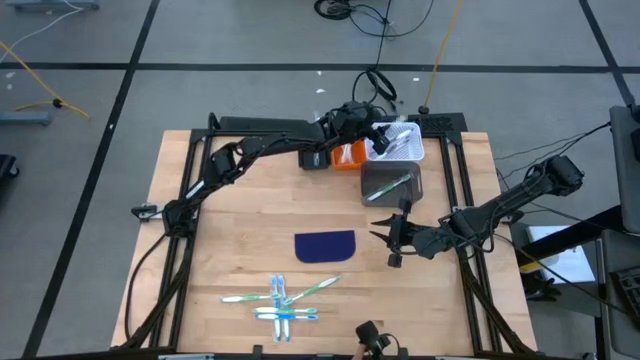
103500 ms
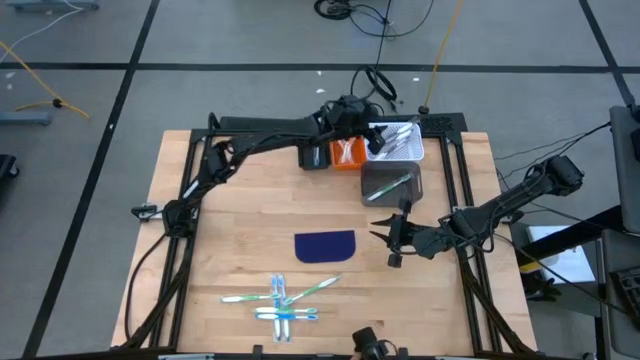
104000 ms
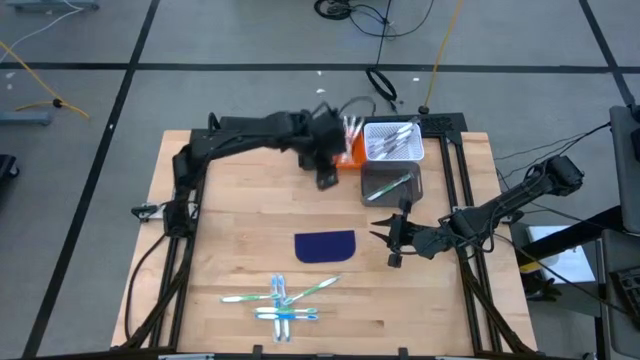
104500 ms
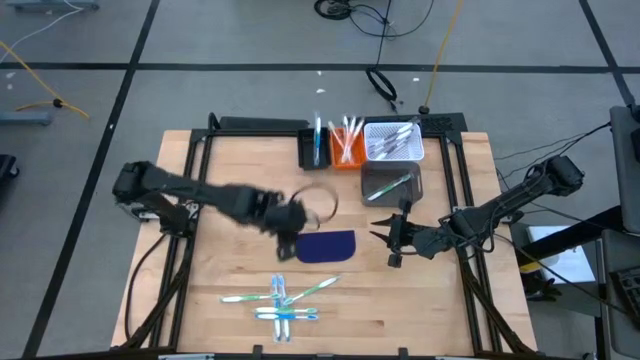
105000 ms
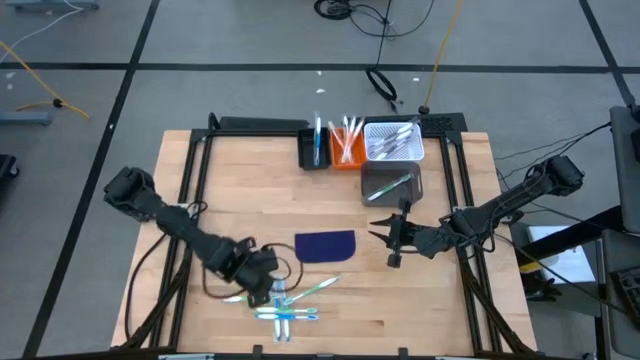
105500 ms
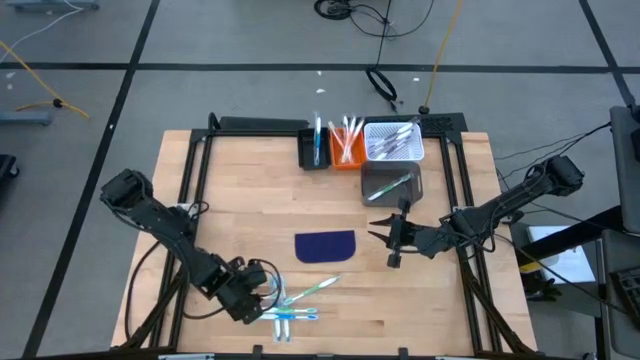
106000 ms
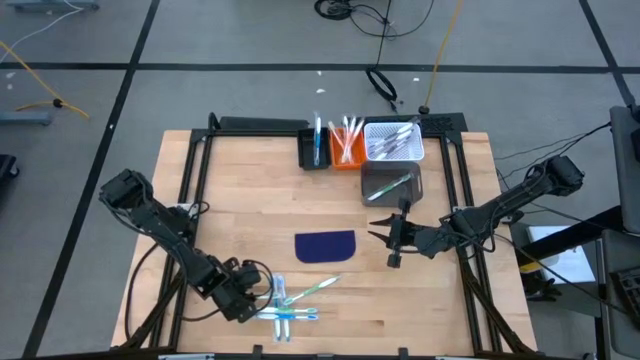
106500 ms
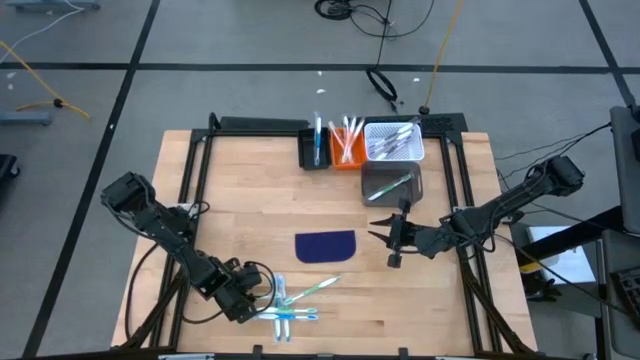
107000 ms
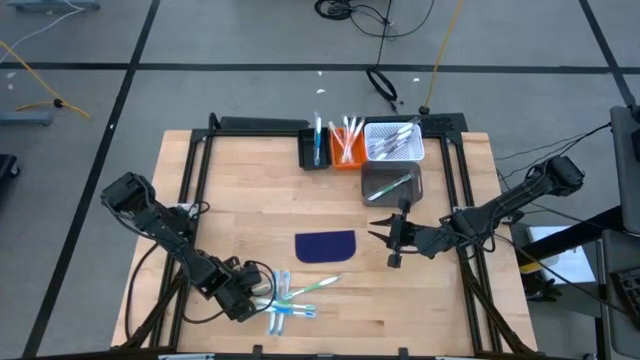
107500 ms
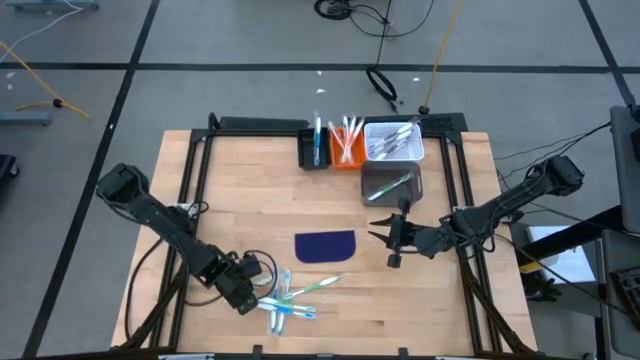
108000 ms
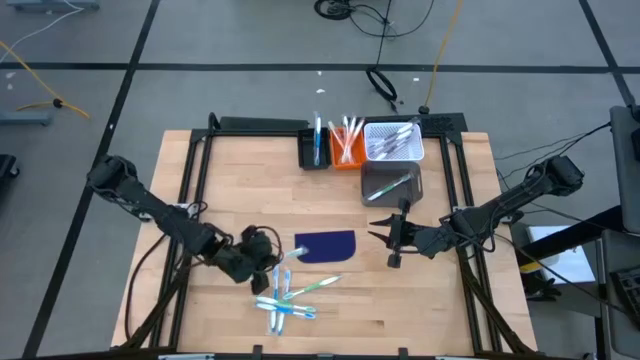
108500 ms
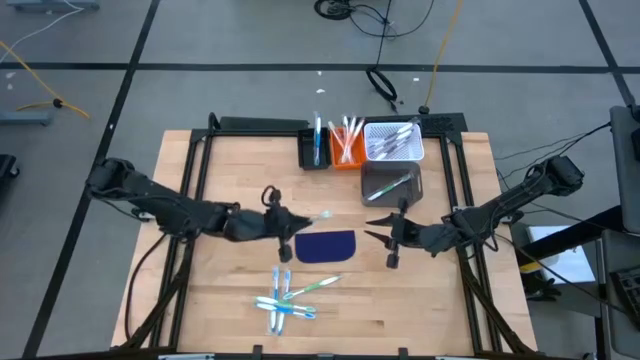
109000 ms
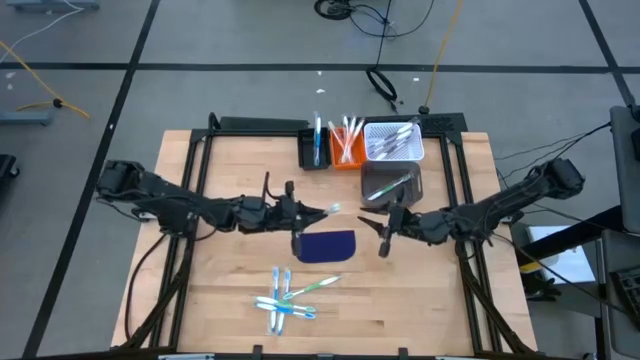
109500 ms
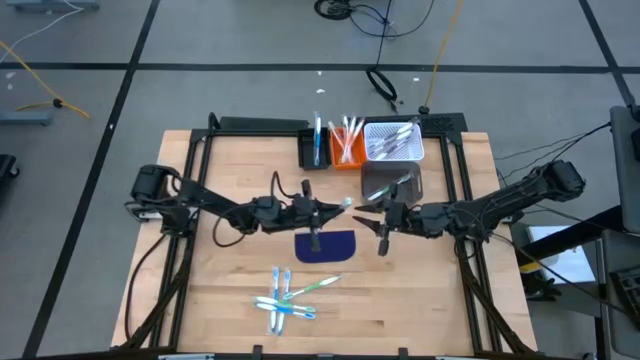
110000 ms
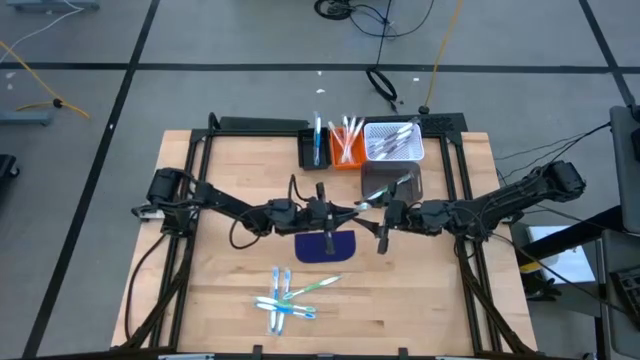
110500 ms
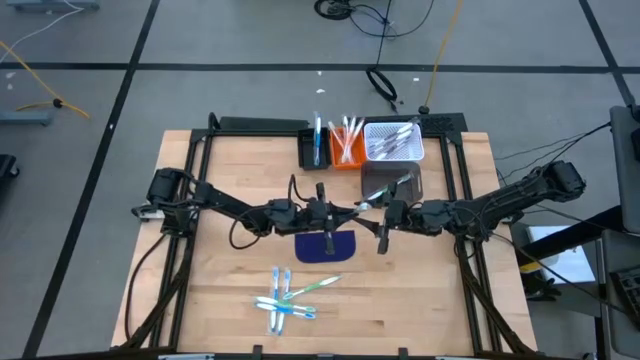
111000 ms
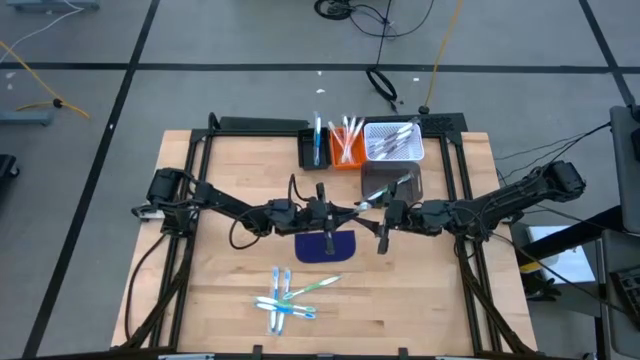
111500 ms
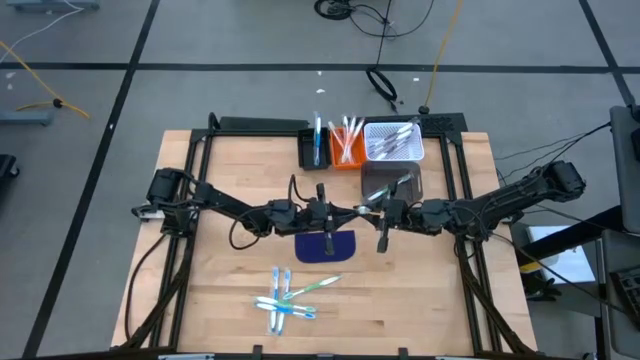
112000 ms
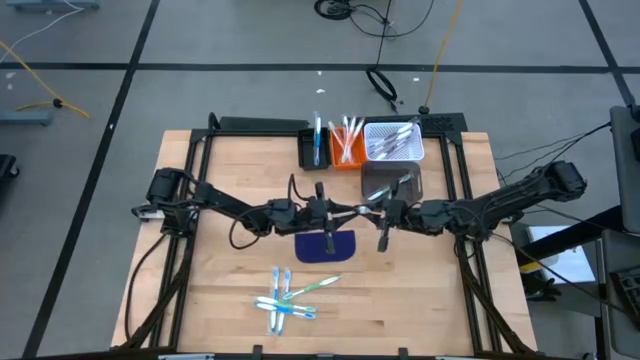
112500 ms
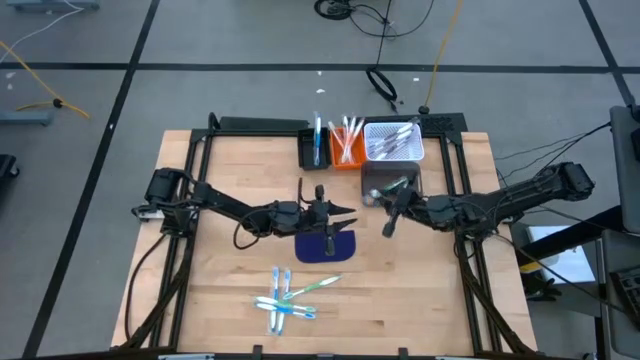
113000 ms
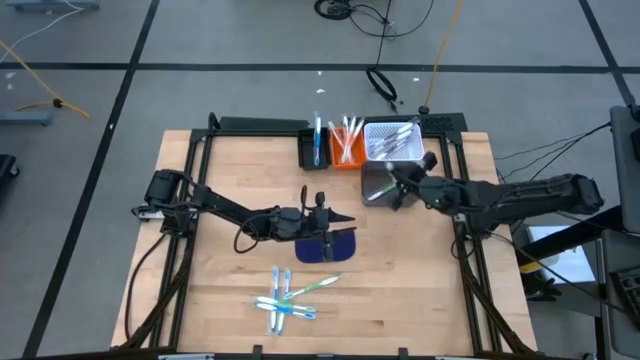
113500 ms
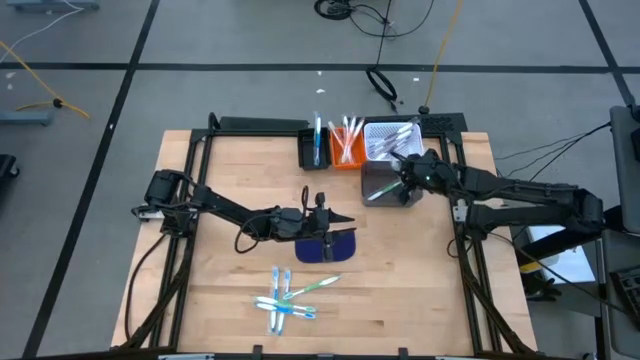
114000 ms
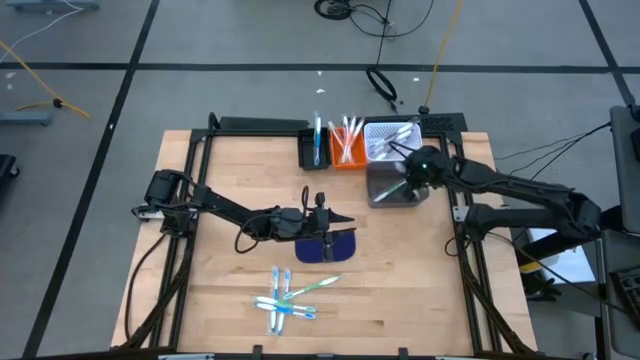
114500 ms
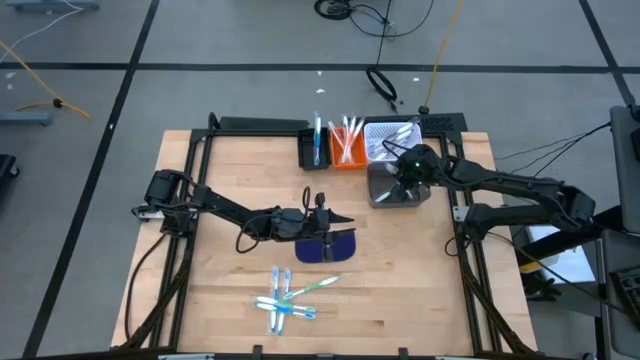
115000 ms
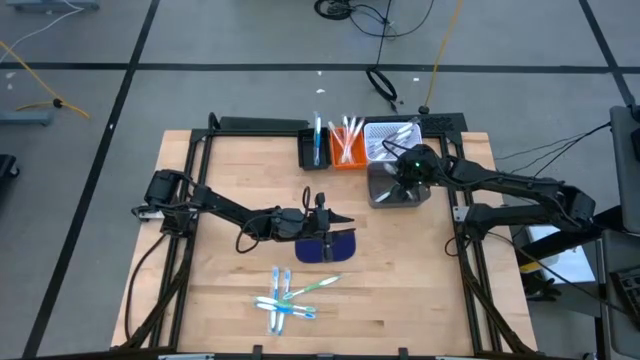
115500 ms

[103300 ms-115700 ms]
Task: Pick & Place Toothbrushes
Put the green toothbrush into the gray bin

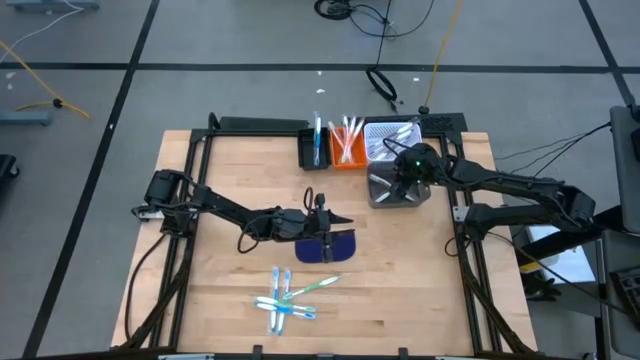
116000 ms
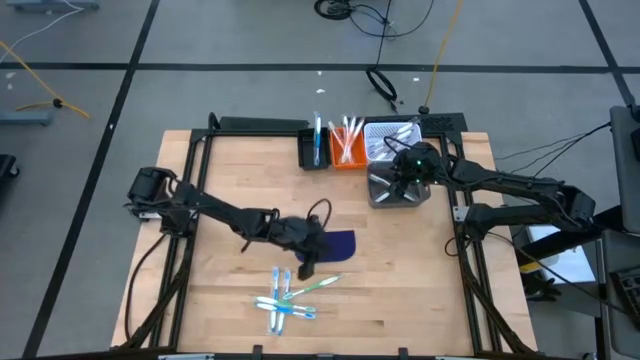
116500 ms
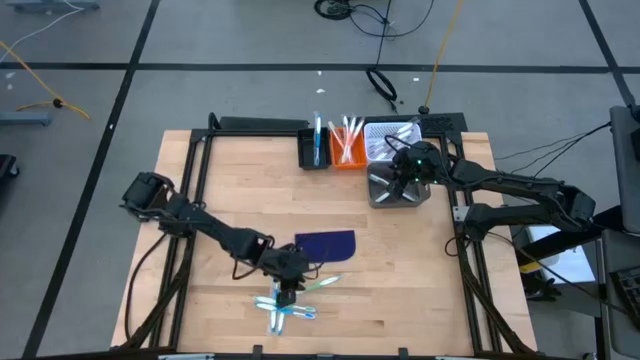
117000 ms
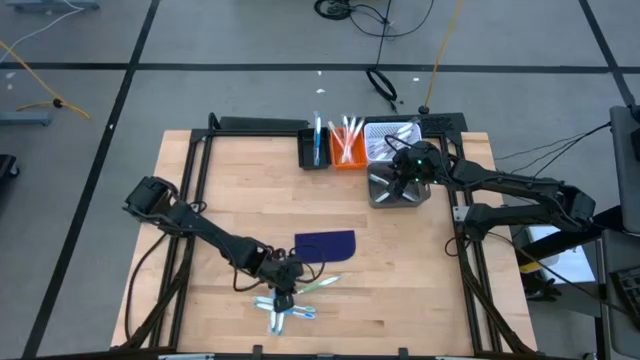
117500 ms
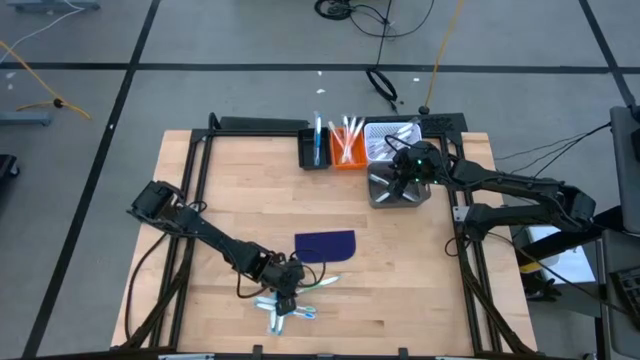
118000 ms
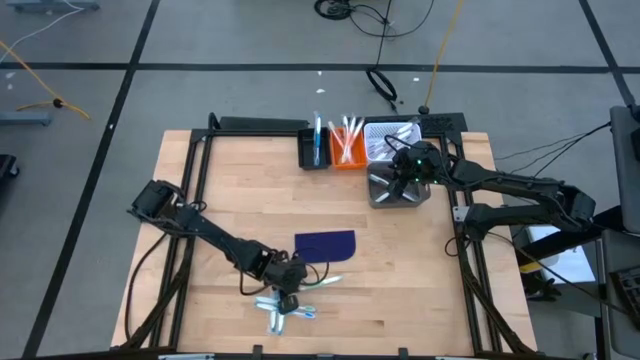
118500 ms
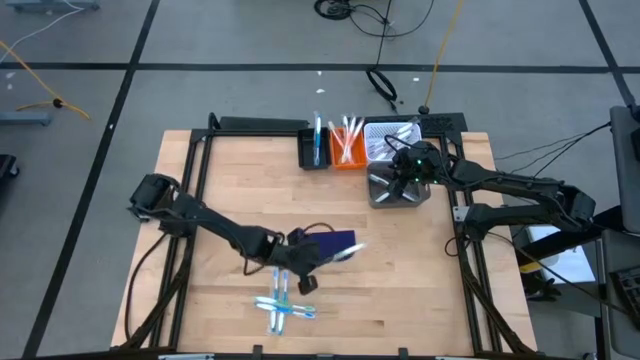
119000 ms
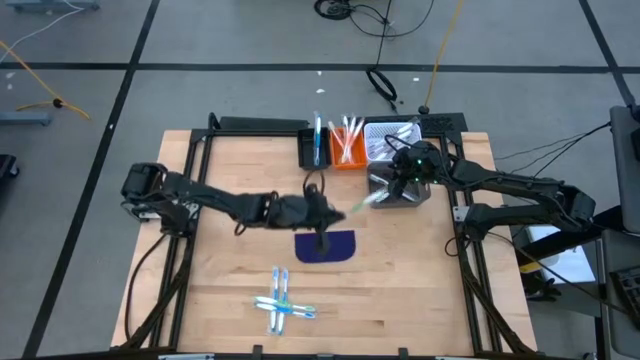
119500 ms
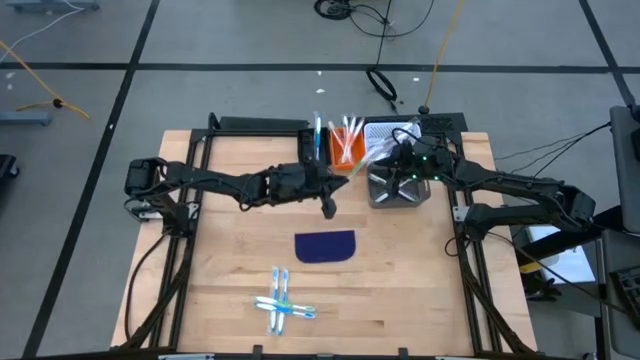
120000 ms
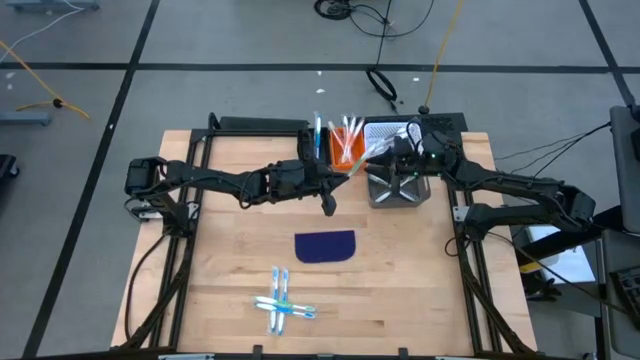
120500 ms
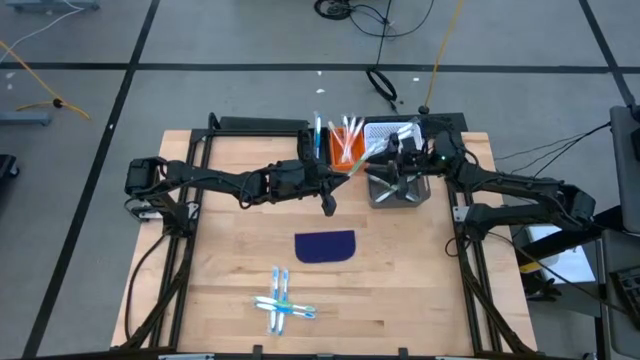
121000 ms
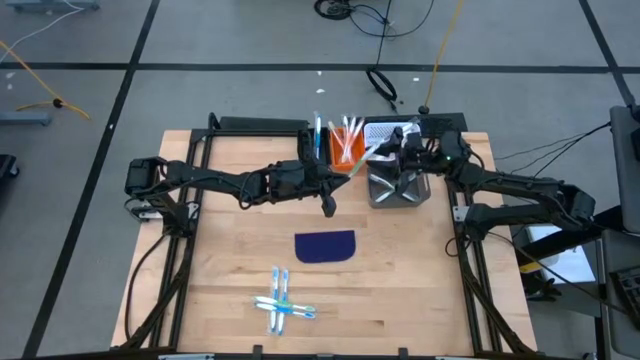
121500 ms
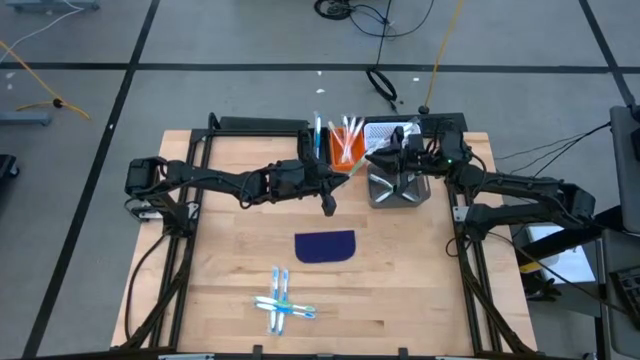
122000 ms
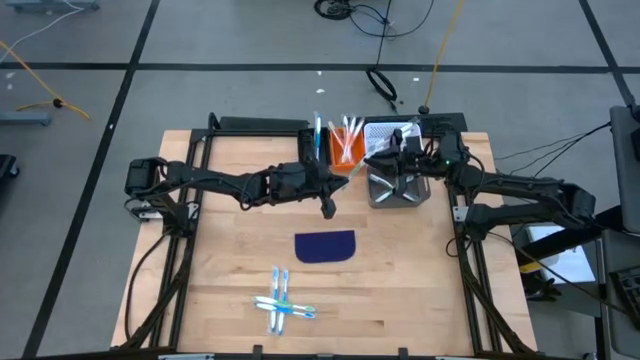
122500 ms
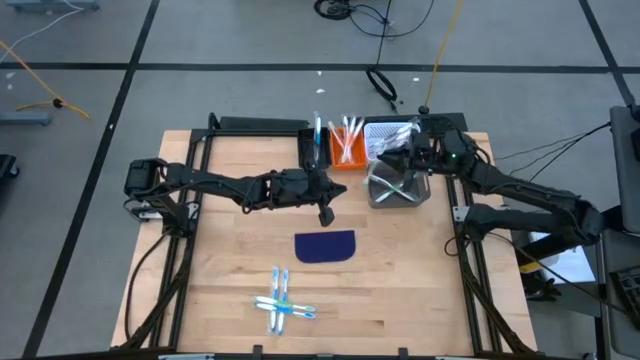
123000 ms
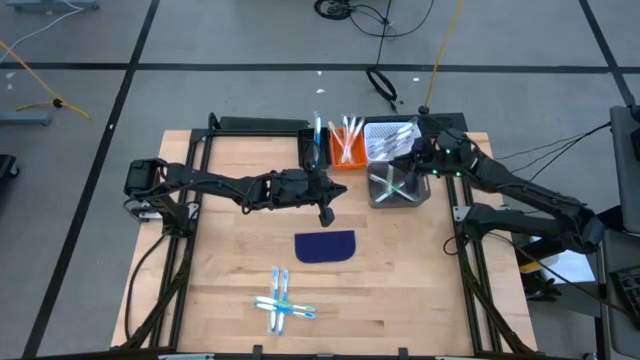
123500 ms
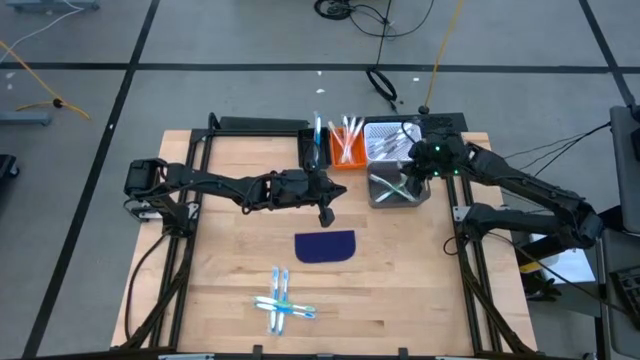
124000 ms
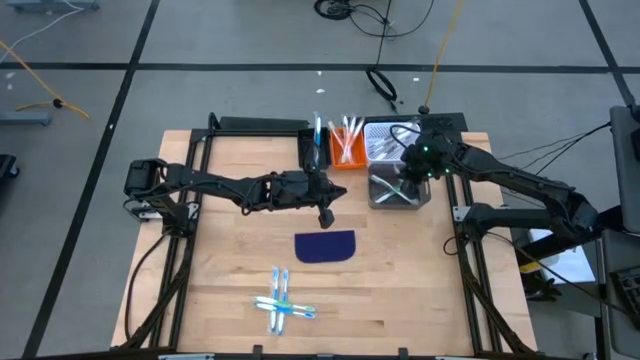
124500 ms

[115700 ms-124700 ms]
Put the green toothbrush into the gray bin
